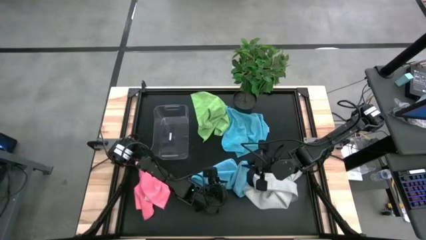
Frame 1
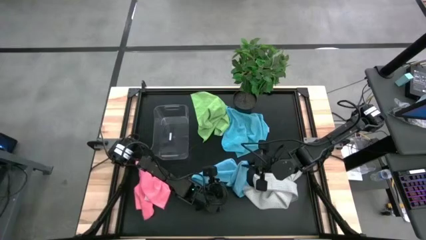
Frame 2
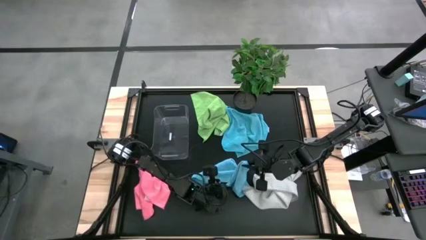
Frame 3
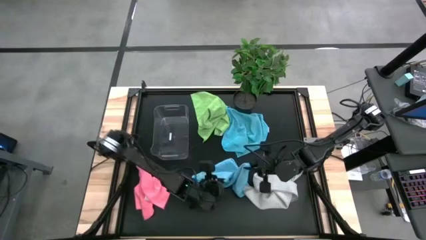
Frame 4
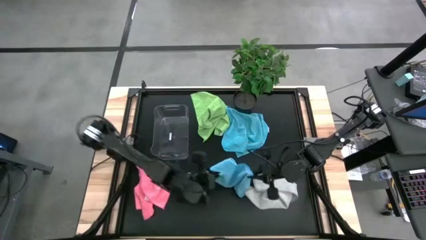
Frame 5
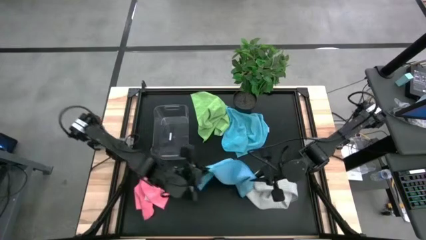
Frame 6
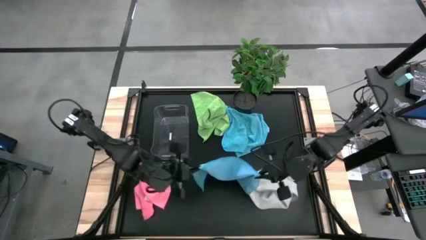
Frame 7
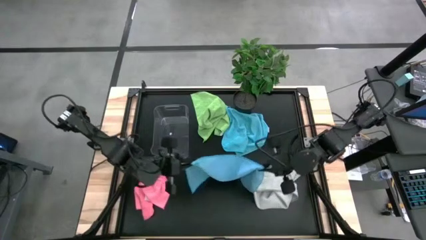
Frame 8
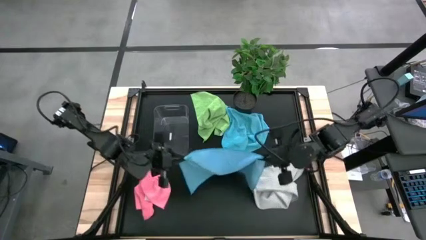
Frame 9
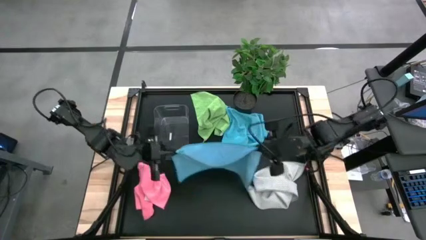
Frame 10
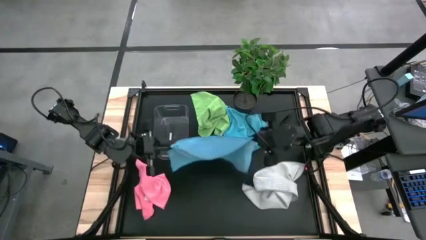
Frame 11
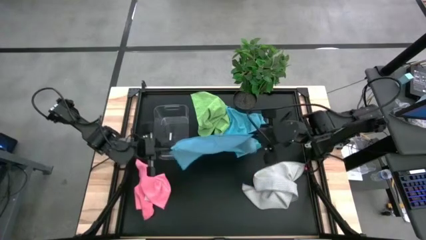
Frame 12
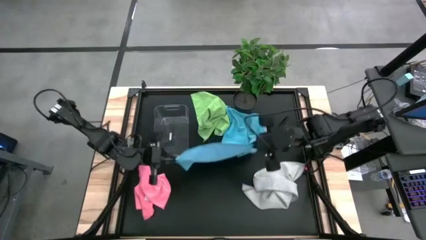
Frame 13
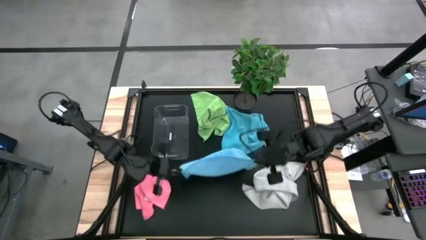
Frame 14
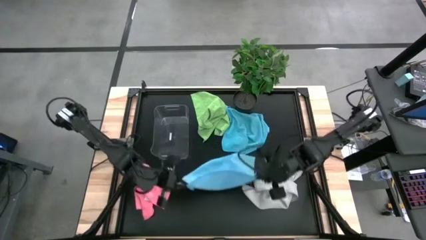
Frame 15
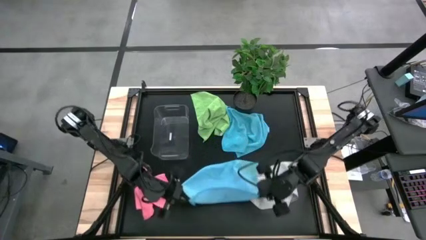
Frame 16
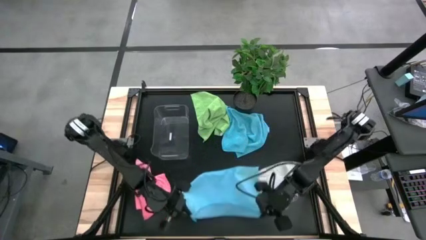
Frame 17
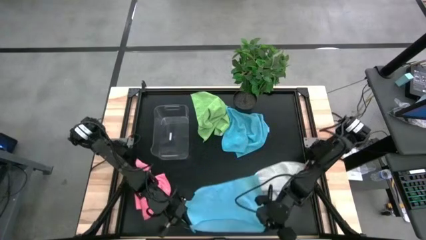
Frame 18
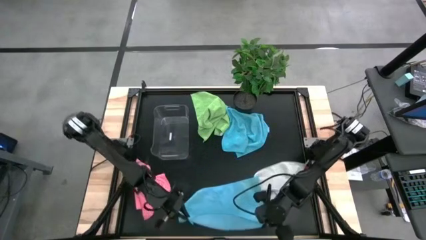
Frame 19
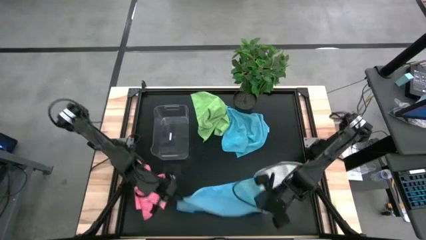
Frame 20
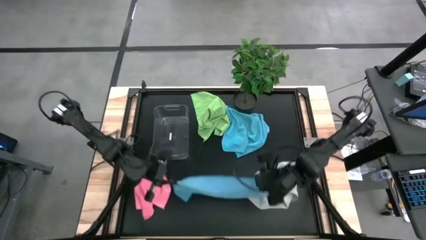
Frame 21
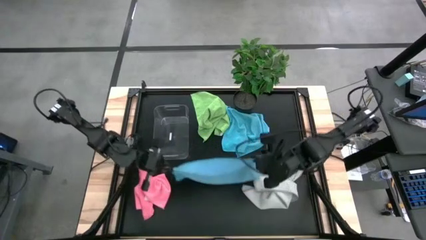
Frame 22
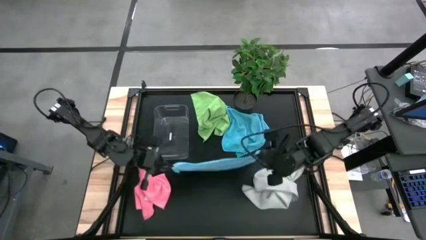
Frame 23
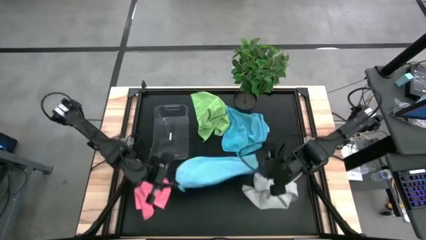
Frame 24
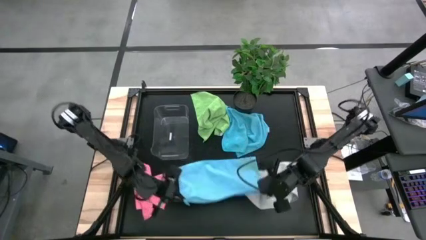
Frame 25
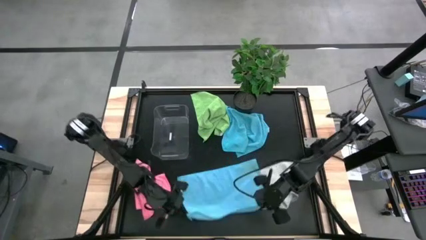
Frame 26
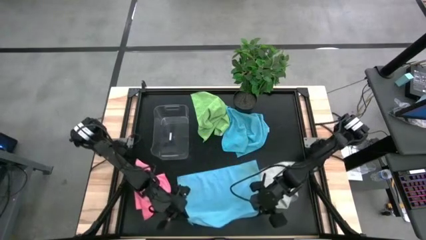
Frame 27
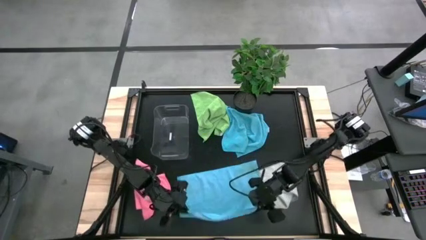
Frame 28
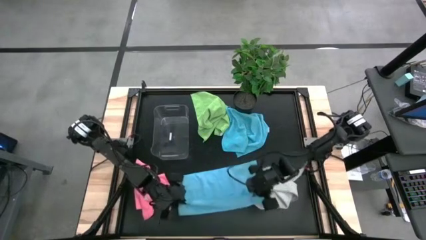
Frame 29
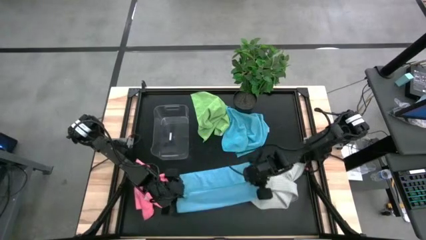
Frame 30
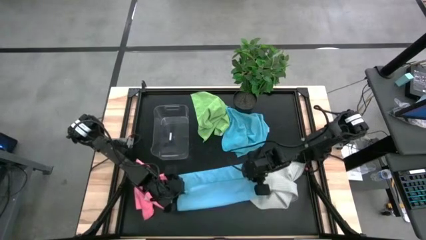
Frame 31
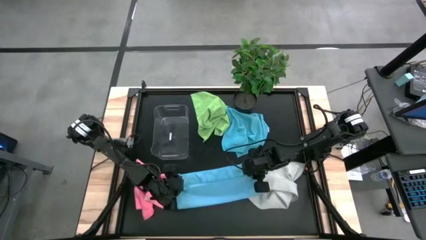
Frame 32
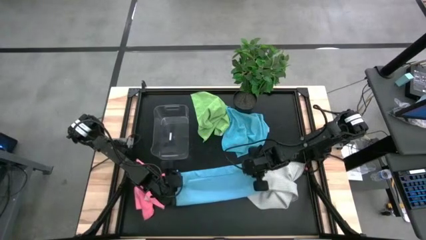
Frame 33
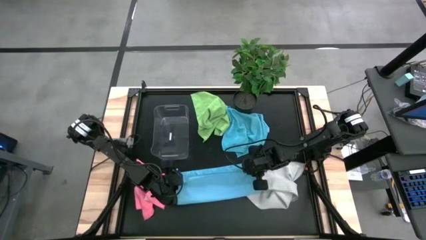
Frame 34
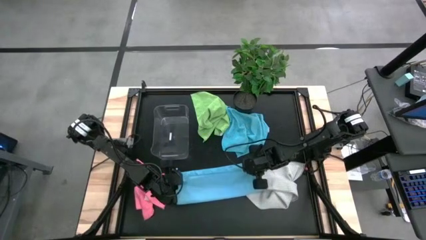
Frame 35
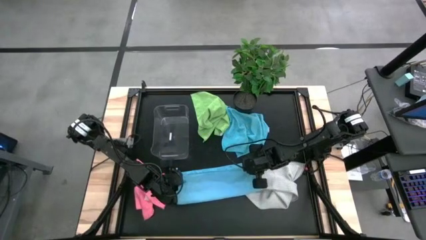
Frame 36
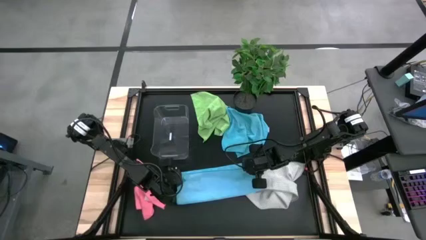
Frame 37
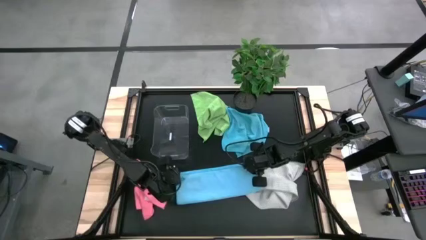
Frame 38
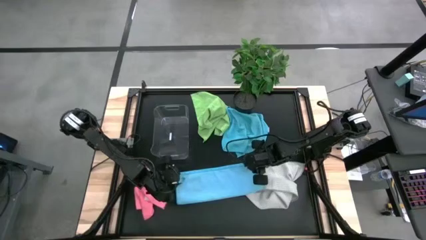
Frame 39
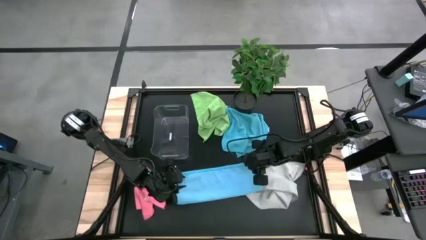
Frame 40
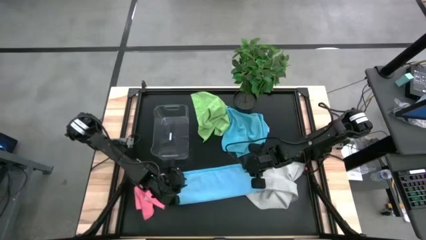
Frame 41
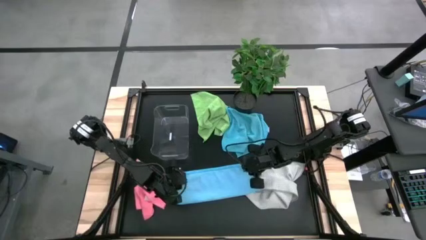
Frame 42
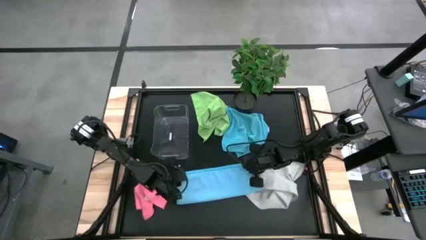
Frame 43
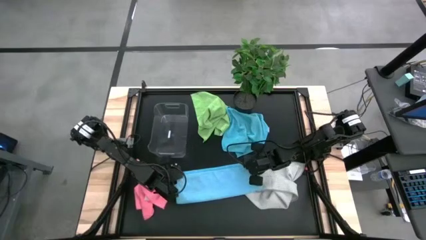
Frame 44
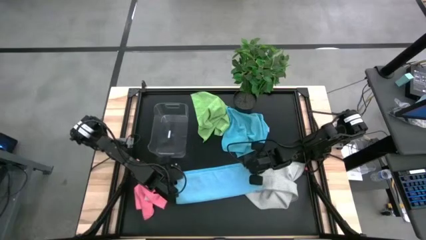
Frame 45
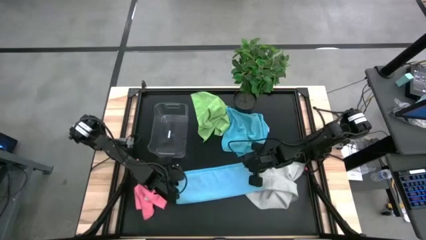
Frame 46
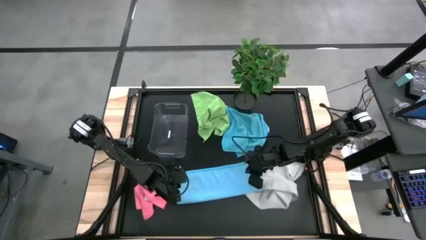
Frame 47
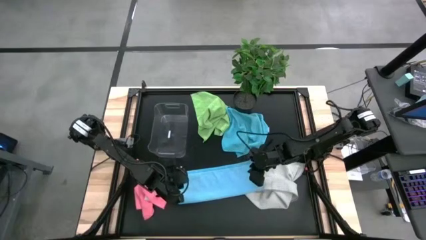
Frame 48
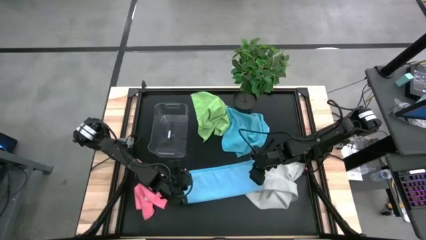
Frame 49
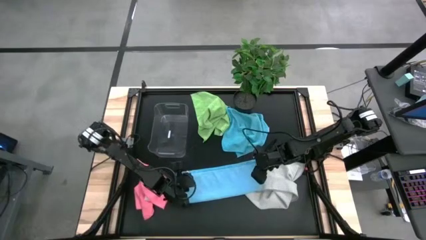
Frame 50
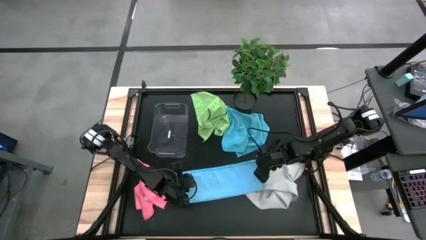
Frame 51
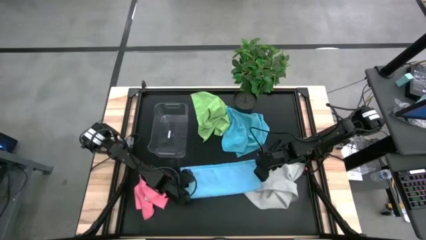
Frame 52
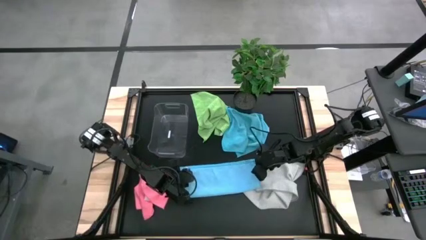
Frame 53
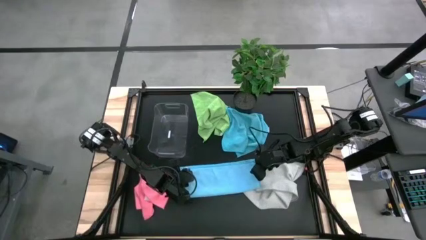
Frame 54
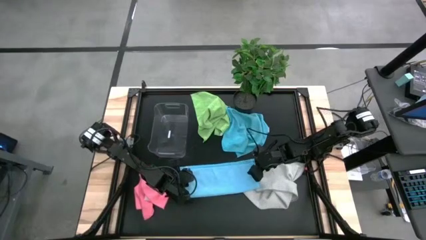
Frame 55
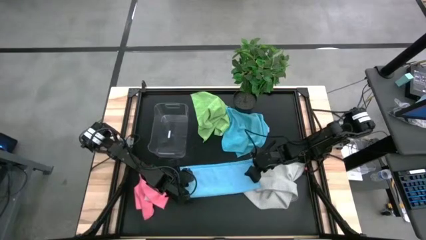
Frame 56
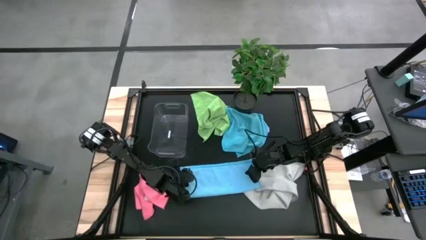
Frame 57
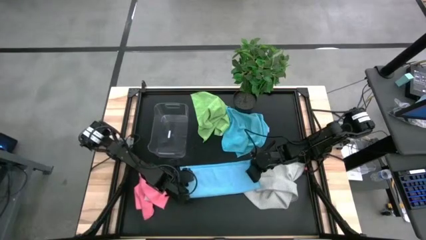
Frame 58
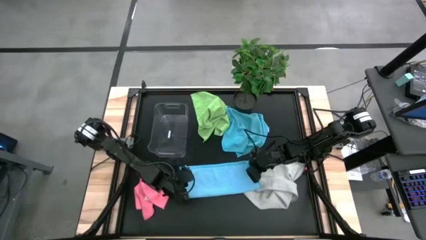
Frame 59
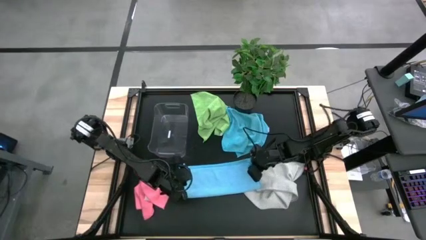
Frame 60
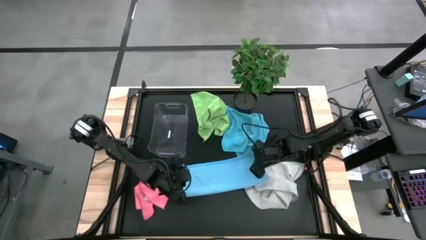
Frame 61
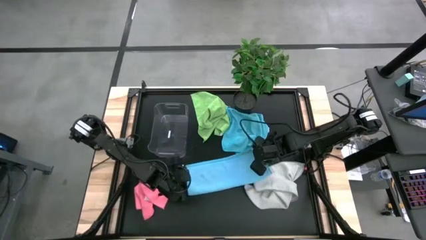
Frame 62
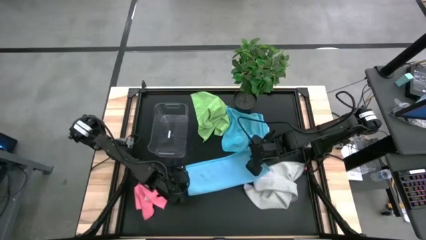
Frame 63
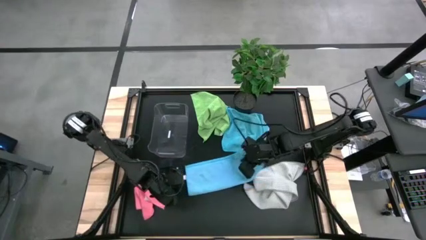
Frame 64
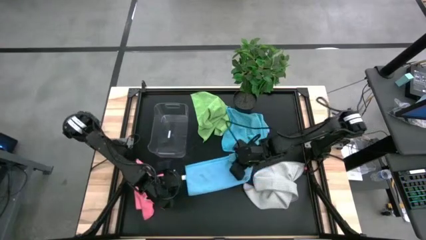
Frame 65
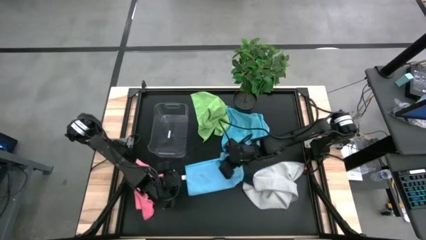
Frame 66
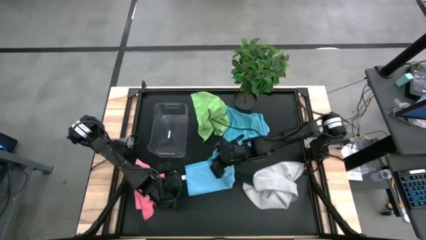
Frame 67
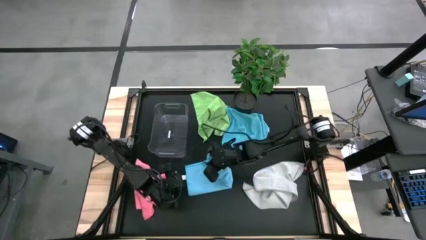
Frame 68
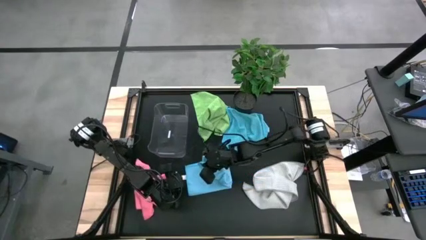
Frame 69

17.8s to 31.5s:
Task: Fold microfiber towels
Fold the bottom blue microfiber towel
